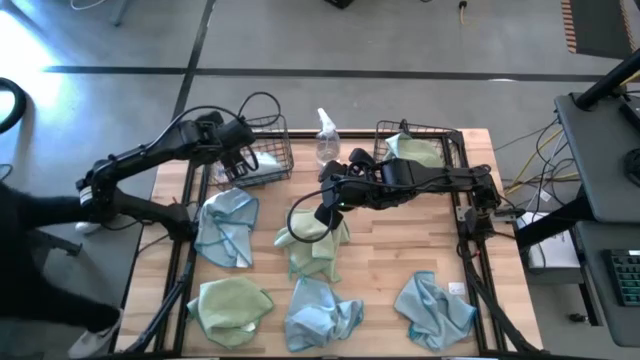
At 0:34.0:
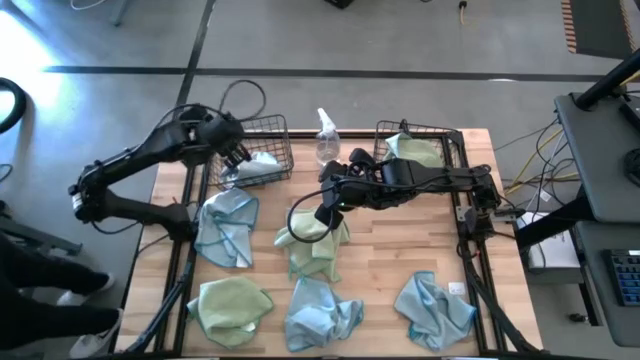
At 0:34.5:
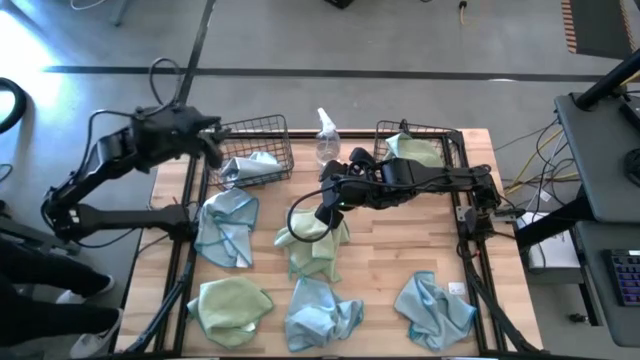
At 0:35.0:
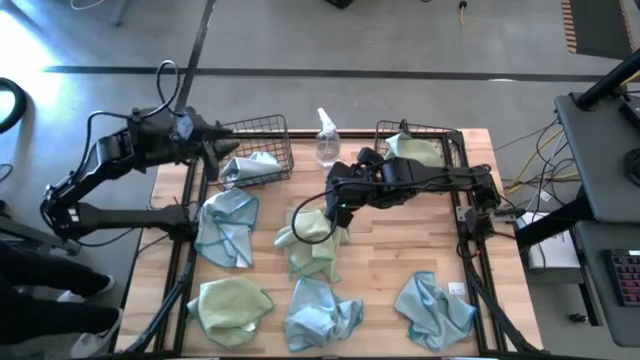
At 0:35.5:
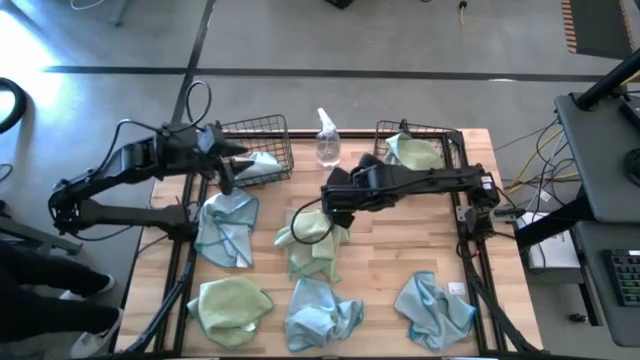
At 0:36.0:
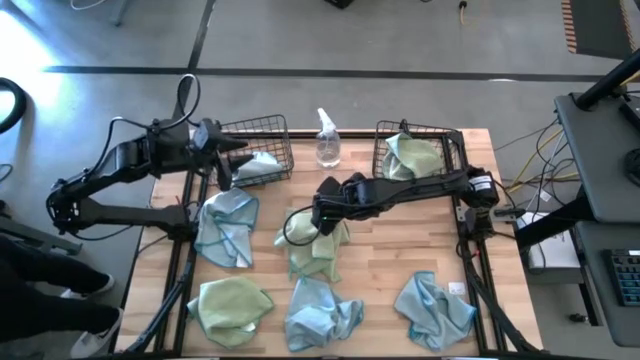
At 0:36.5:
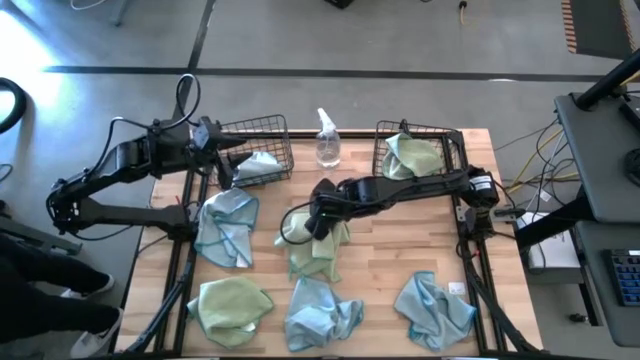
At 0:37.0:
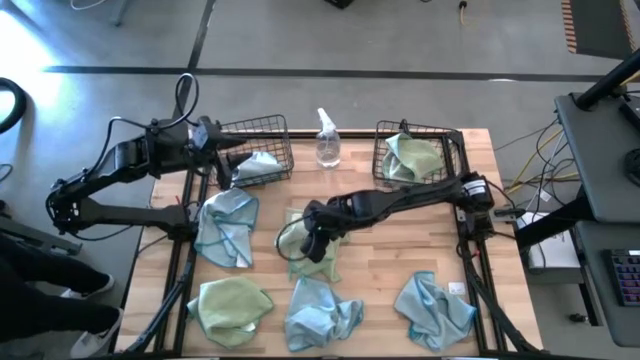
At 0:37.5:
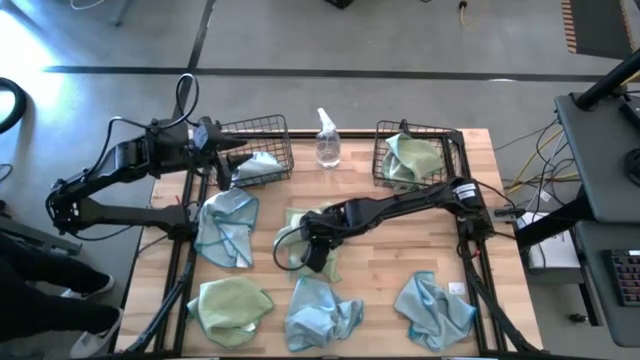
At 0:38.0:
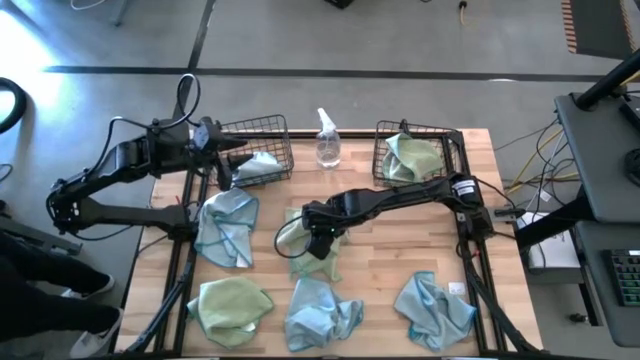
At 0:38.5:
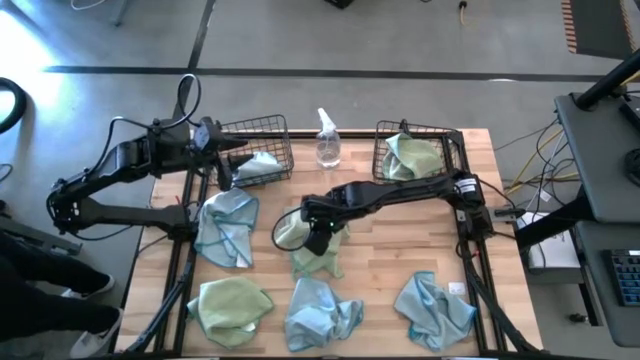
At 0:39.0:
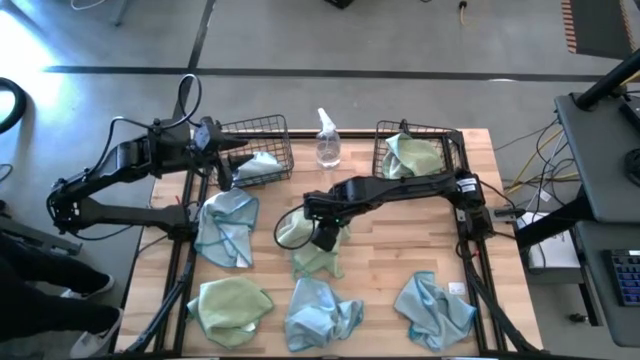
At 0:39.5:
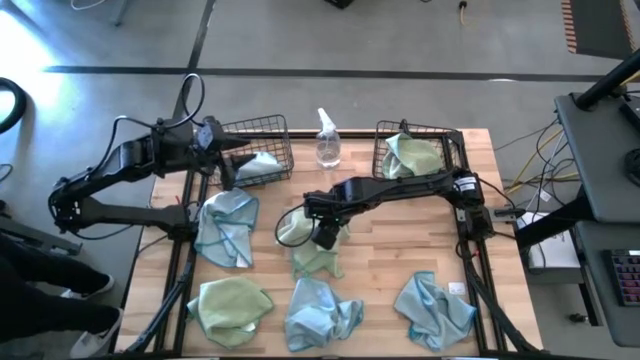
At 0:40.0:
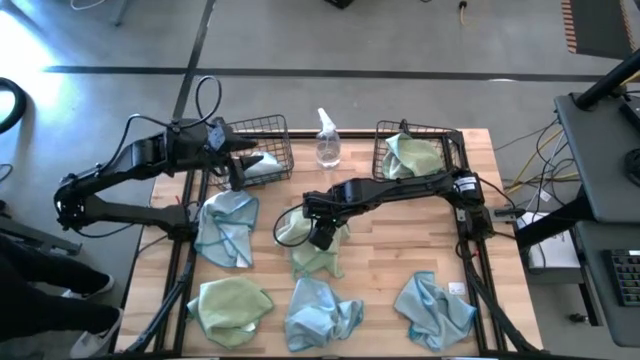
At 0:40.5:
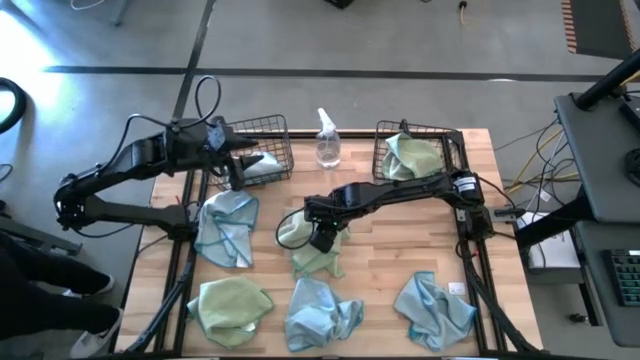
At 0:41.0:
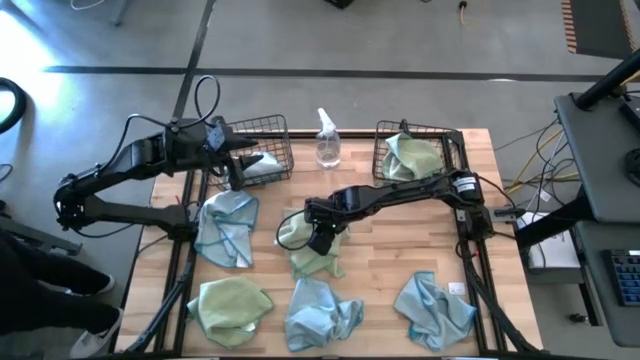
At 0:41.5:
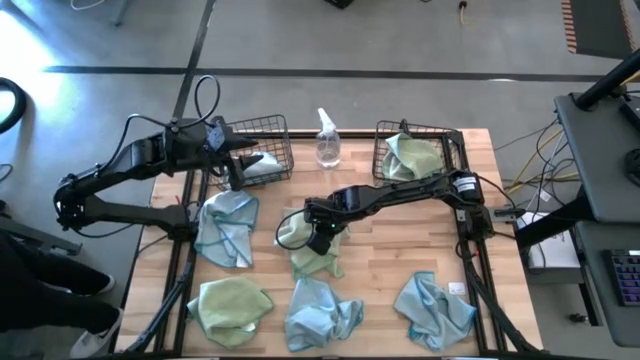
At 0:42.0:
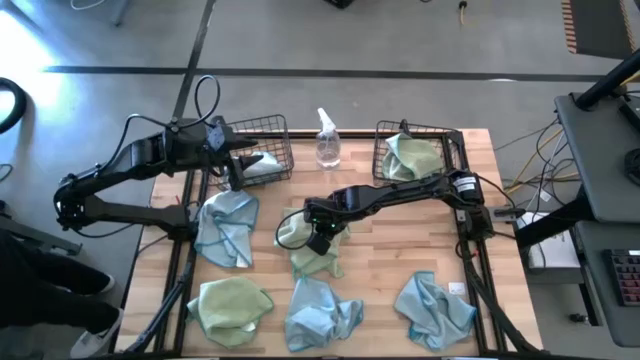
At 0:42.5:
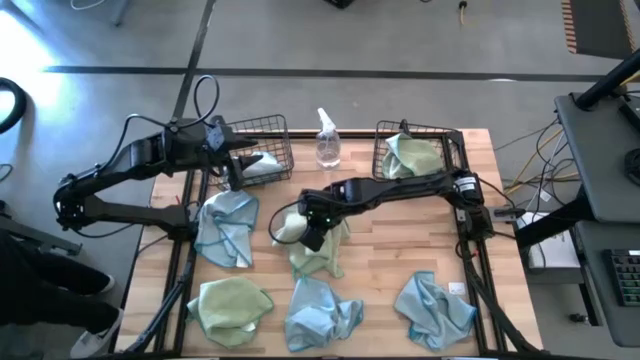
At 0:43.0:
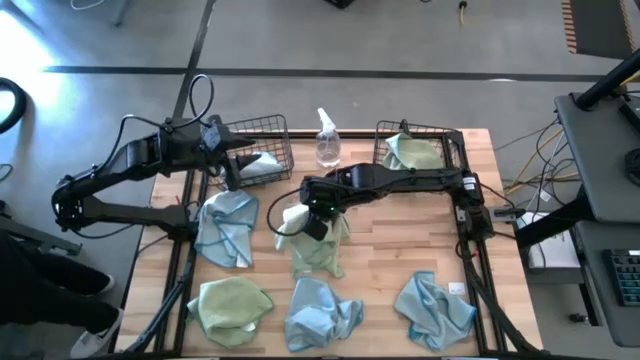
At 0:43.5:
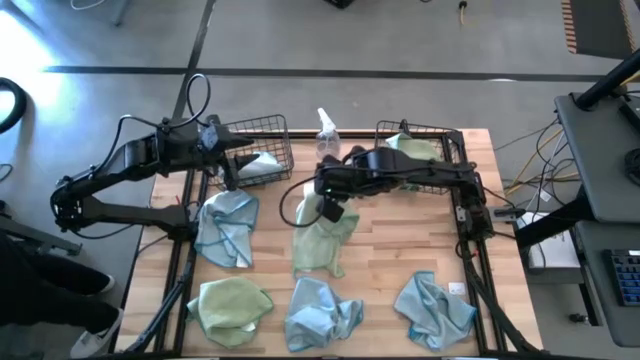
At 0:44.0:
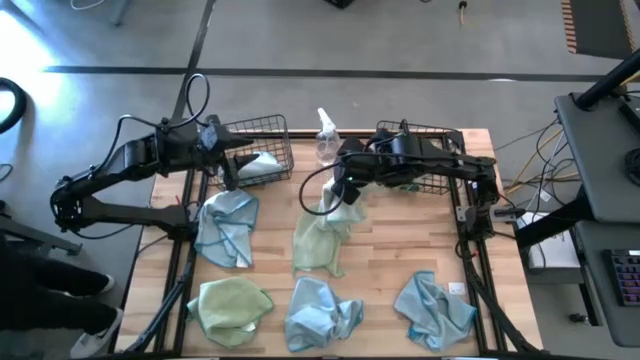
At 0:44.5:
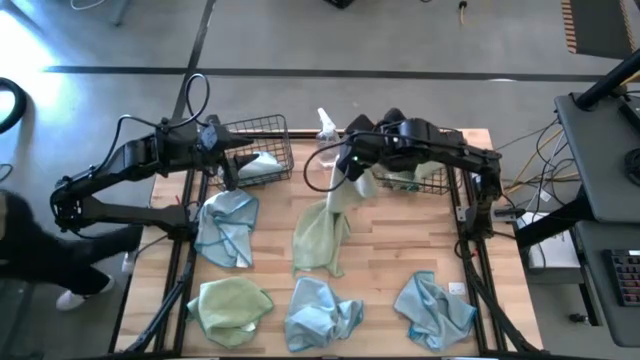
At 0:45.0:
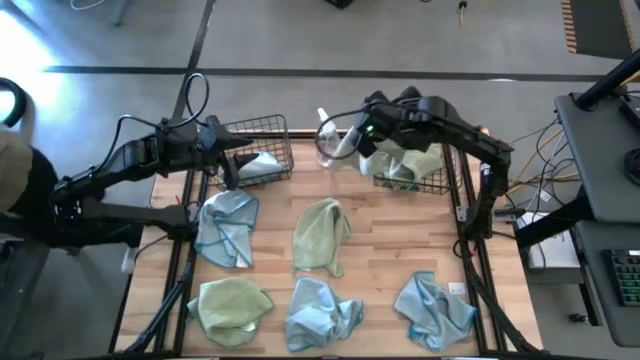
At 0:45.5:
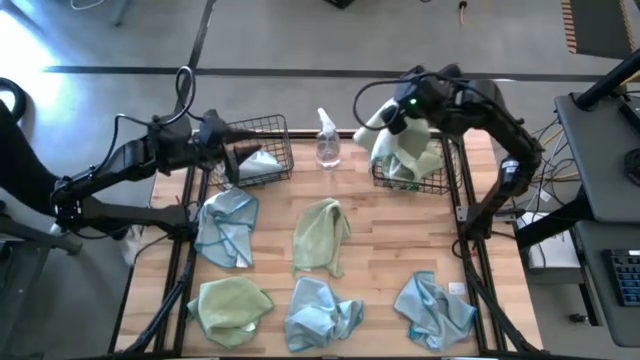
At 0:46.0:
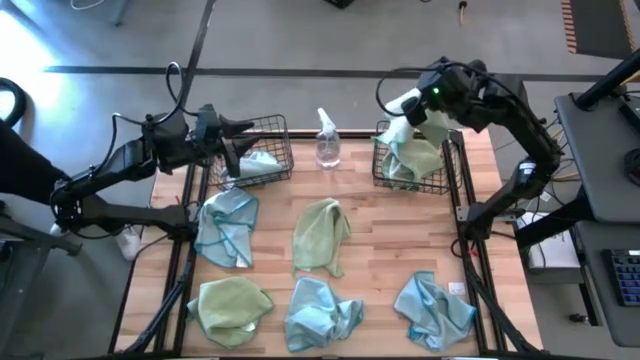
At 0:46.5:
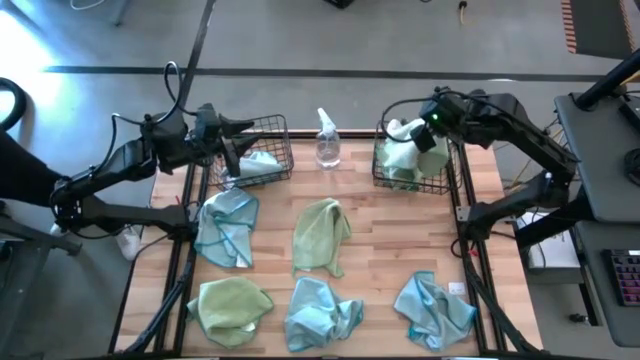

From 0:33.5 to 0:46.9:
Task: Sort microfiber towel by color & place in baskets
Put the green microfiber cloth into the right wire basket
